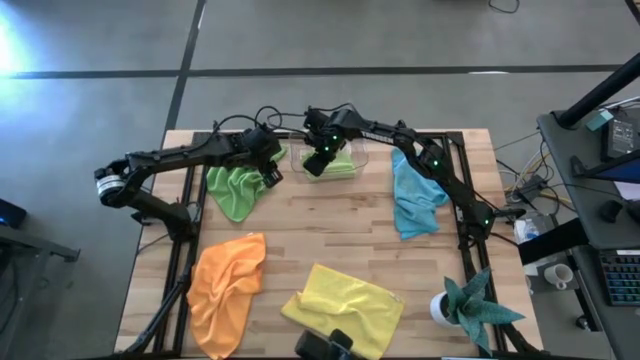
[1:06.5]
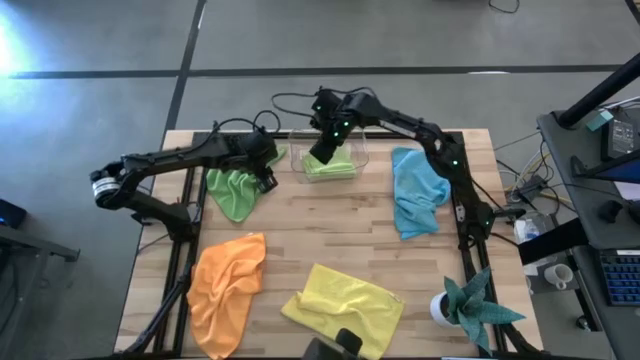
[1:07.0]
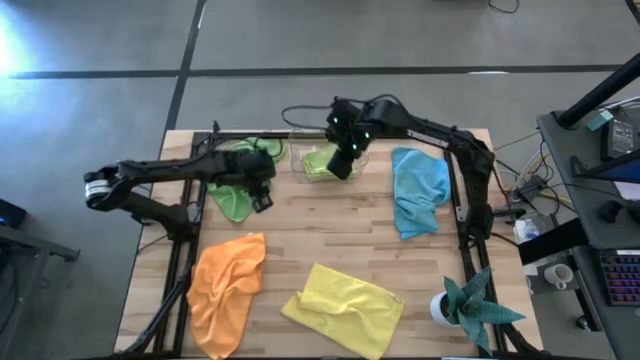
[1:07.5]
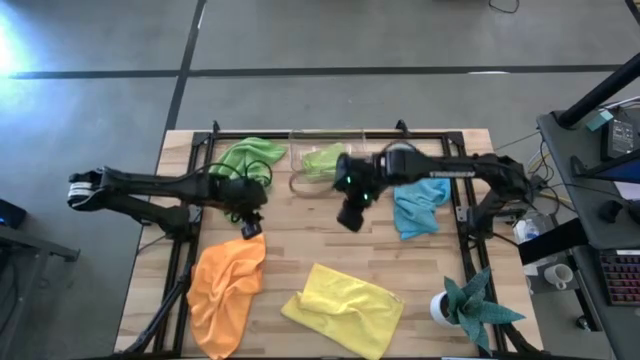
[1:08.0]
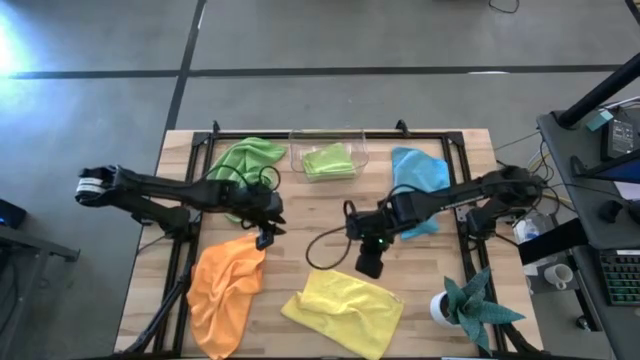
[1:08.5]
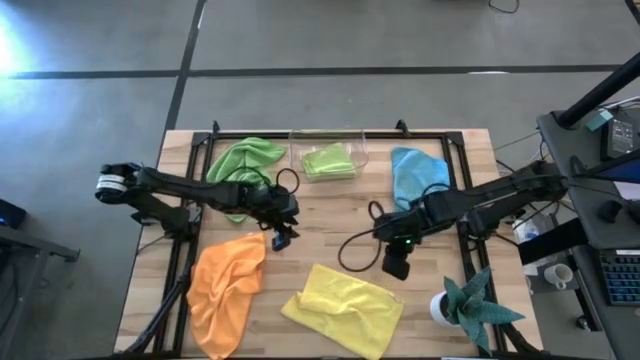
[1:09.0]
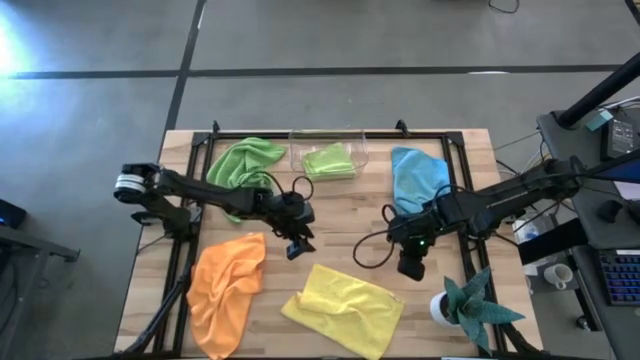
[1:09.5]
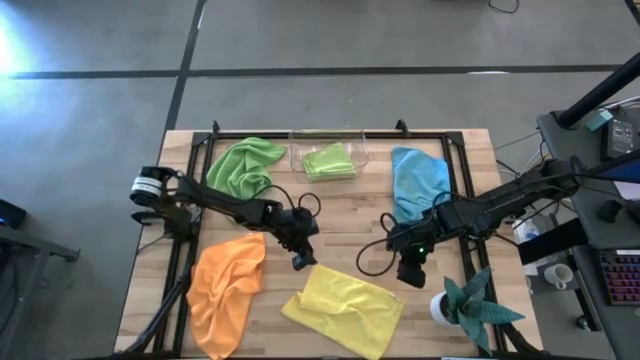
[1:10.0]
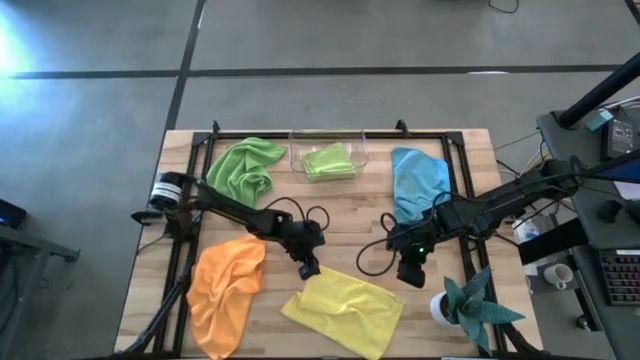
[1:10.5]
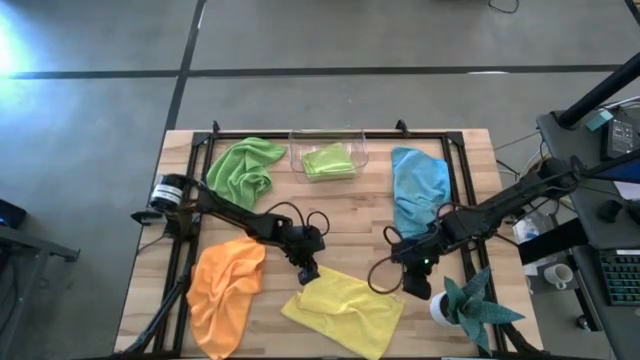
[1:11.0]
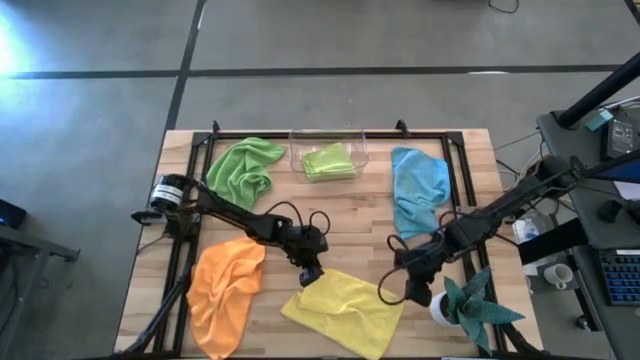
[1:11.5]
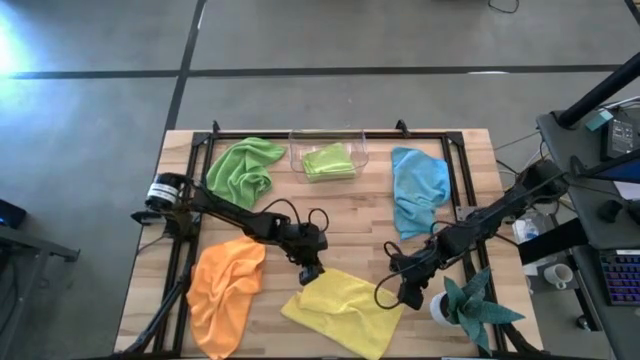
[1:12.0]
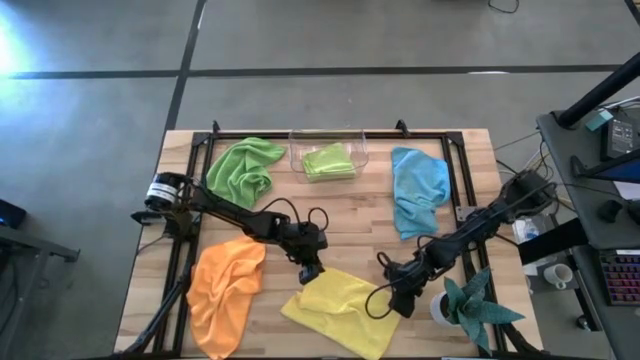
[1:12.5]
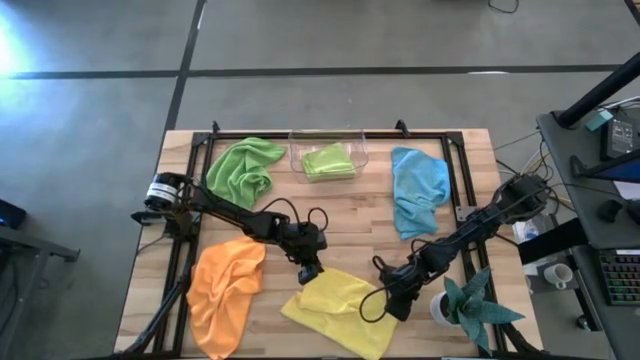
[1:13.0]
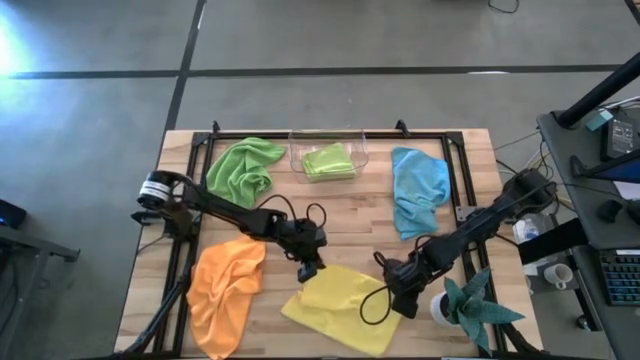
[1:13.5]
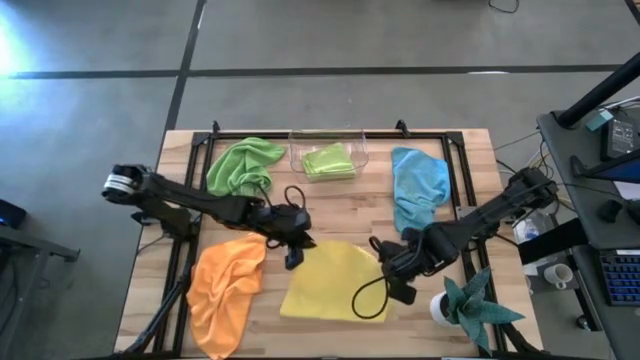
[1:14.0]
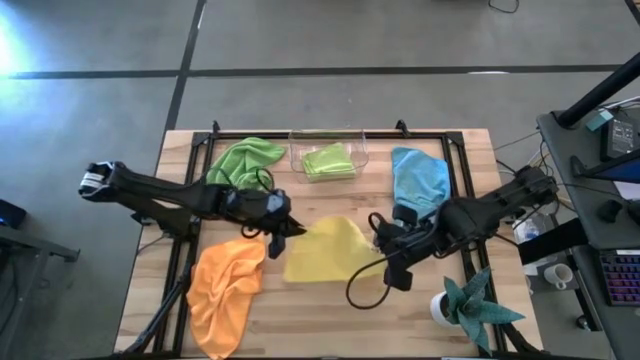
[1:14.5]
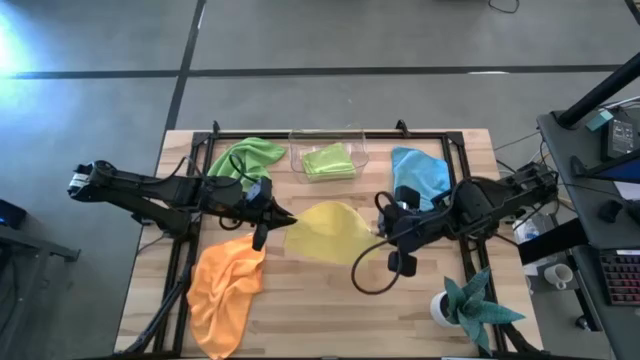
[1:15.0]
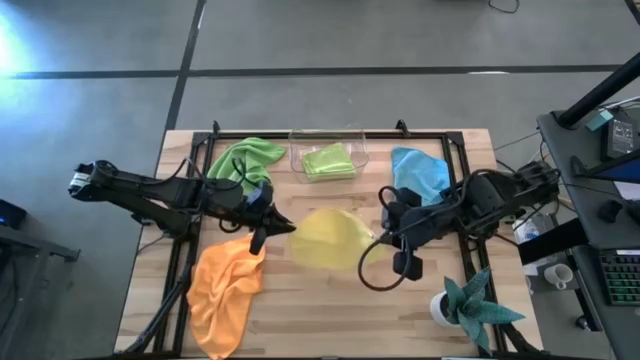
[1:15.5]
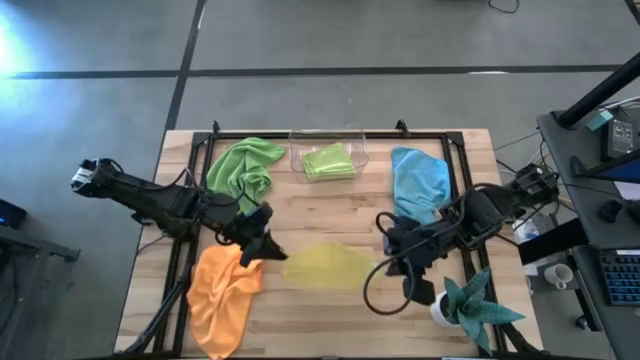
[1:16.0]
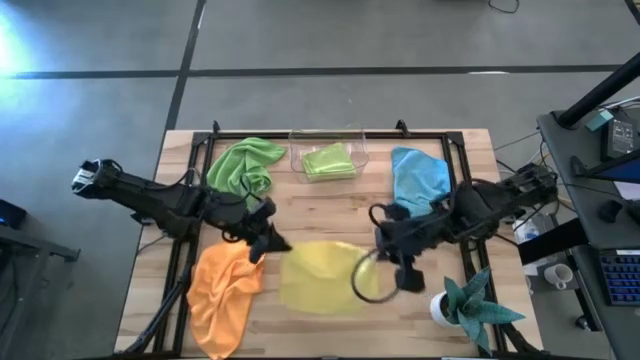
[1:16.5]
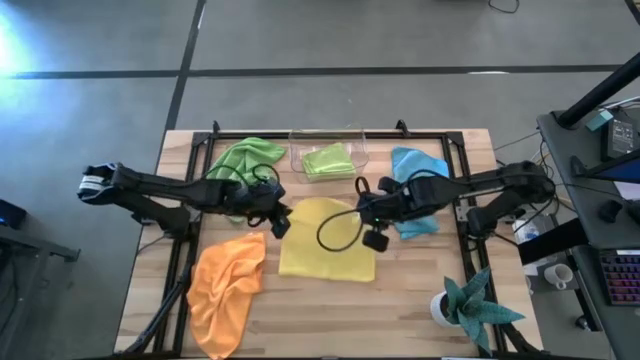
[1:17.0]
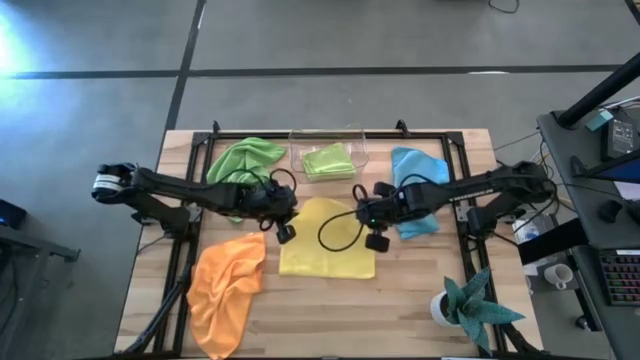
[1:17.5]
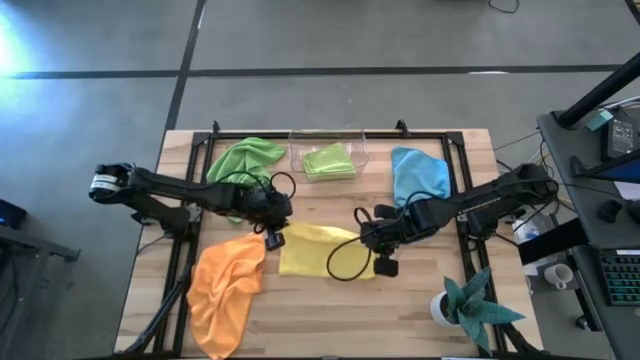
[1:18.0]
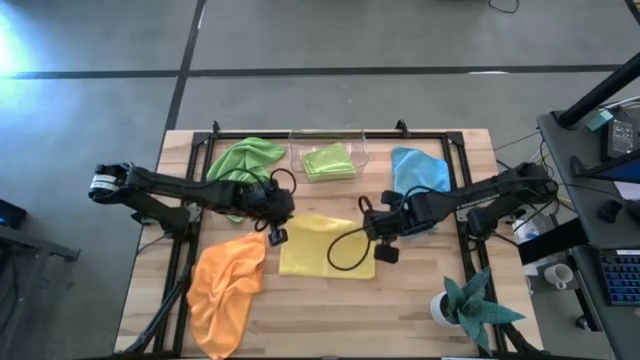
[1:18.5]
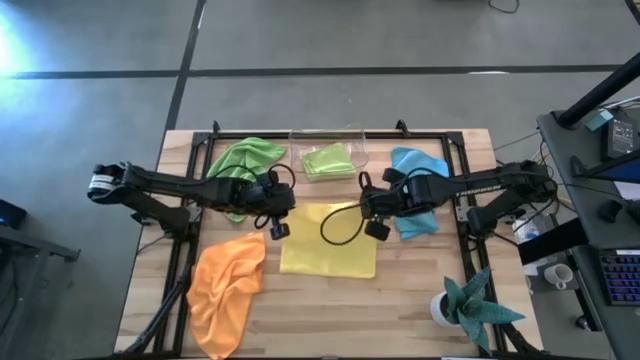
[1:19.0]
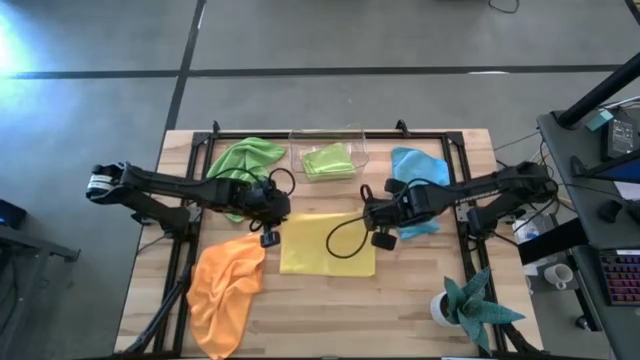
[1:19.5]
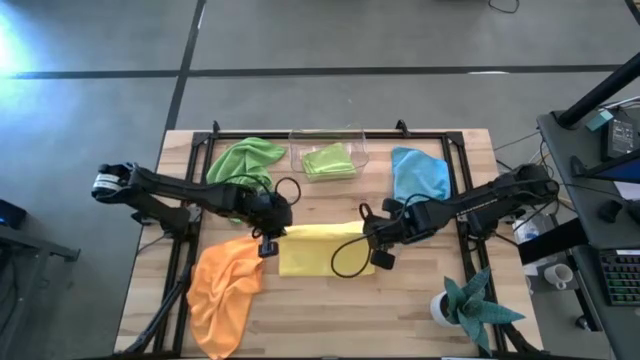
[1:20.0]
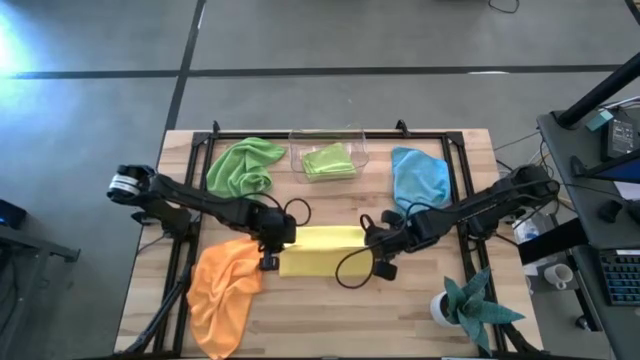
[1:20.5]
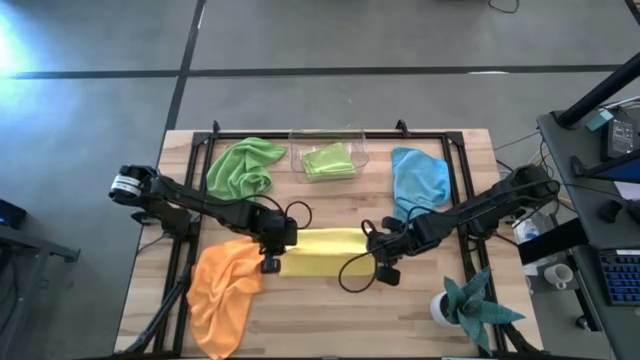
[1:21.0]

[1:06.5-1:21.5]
Task: Fold microfiber towels
Fold the yellow microfiber towel

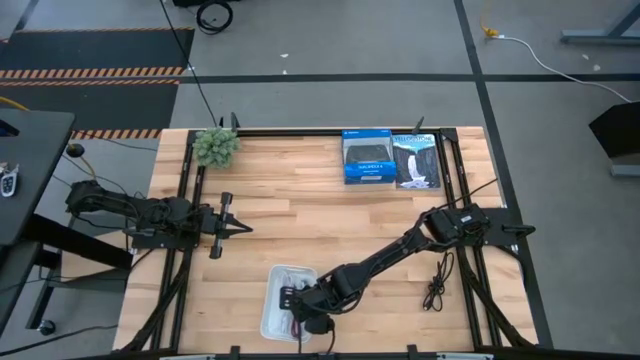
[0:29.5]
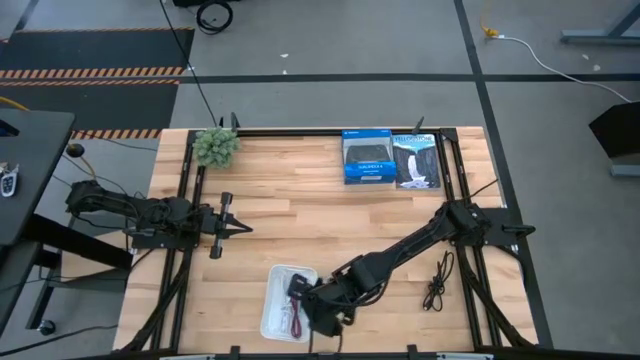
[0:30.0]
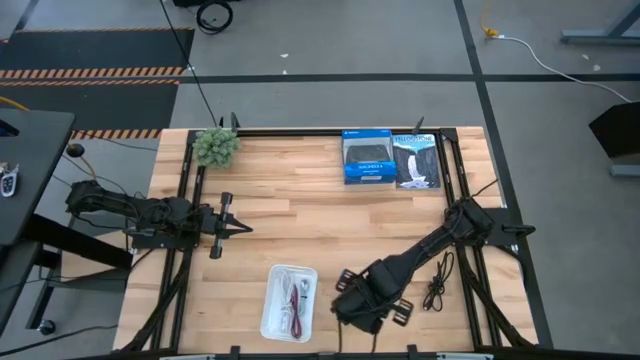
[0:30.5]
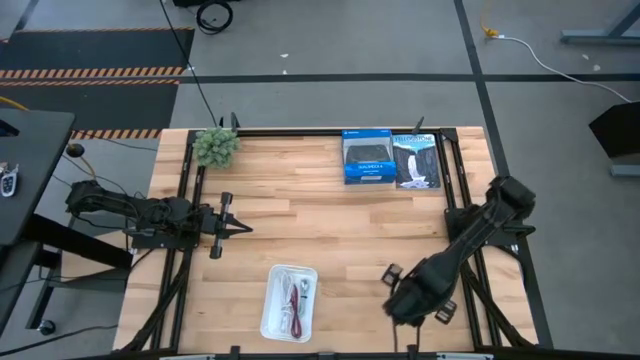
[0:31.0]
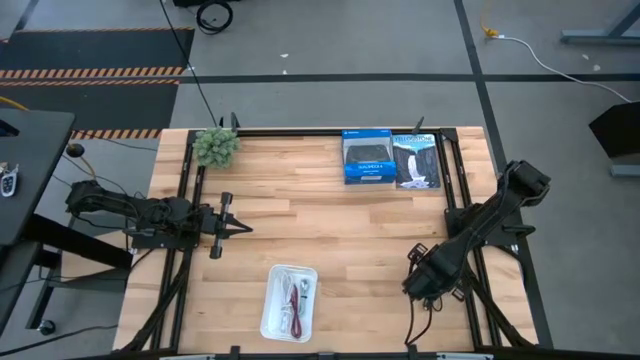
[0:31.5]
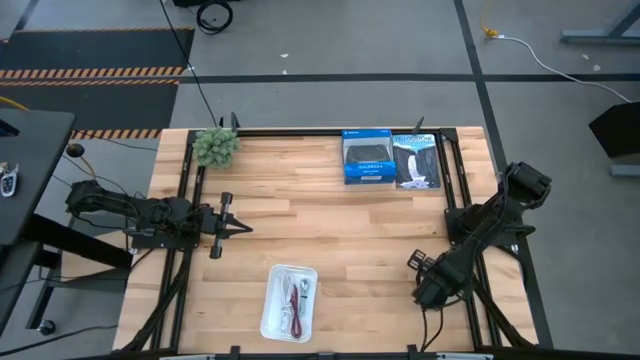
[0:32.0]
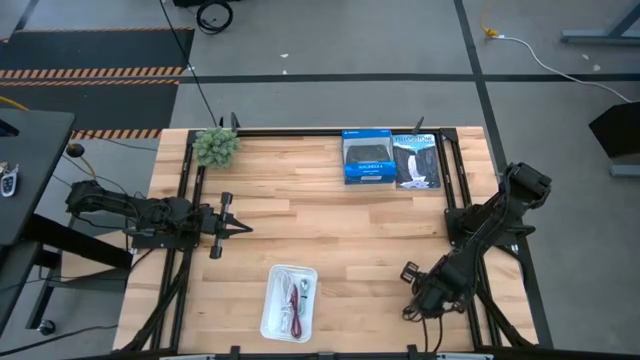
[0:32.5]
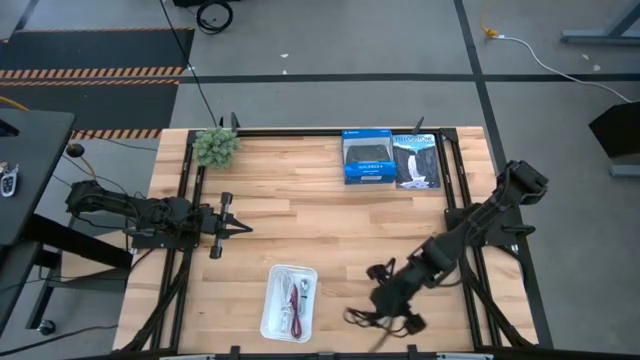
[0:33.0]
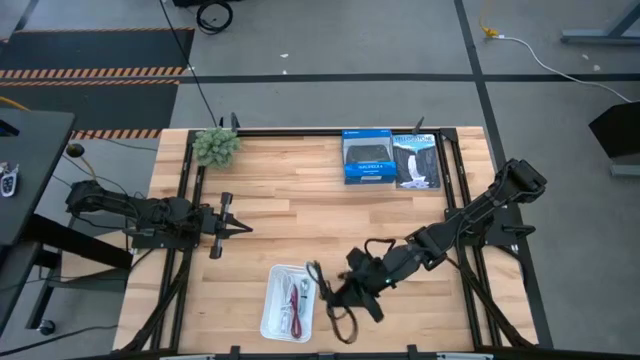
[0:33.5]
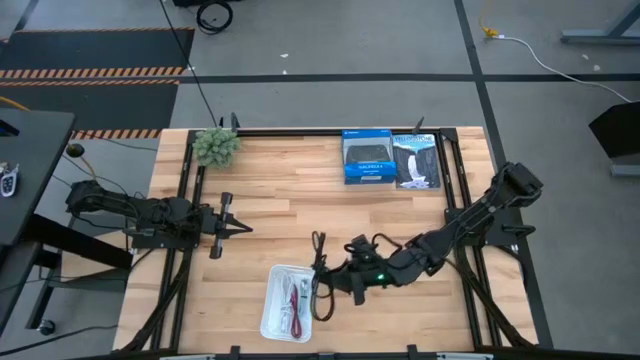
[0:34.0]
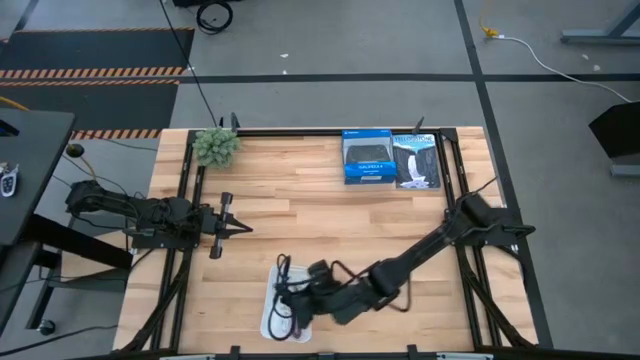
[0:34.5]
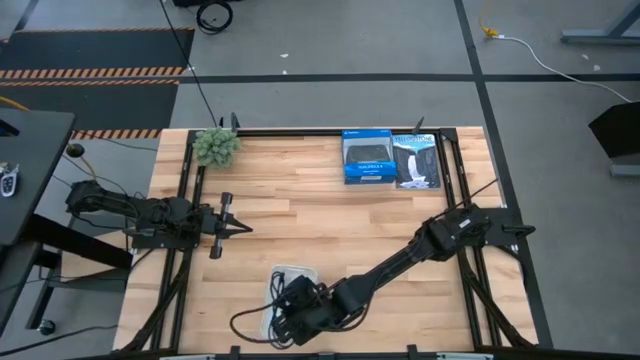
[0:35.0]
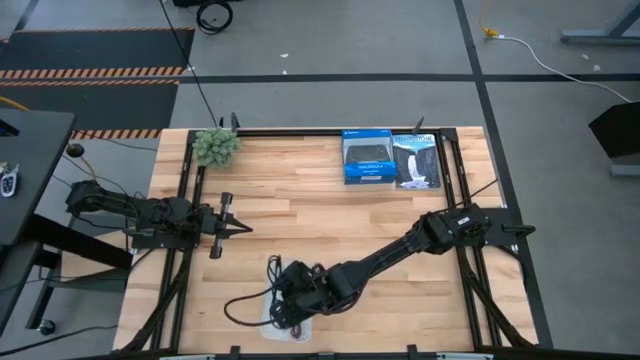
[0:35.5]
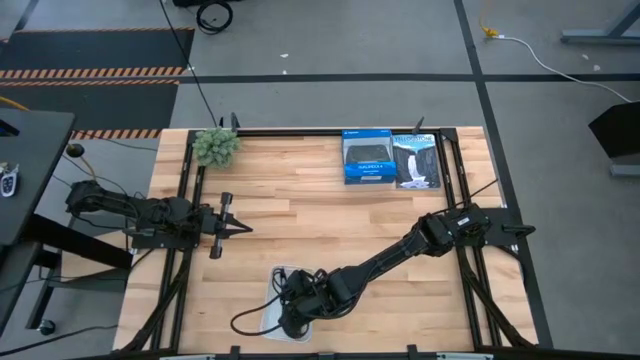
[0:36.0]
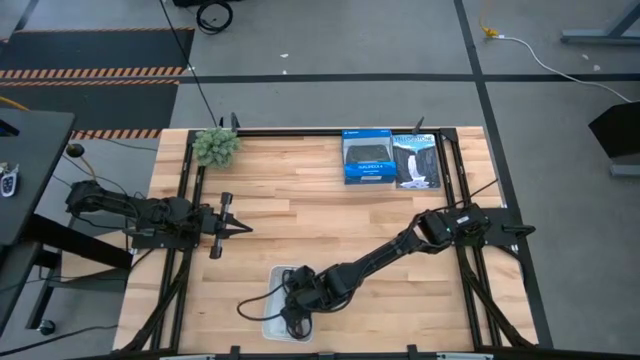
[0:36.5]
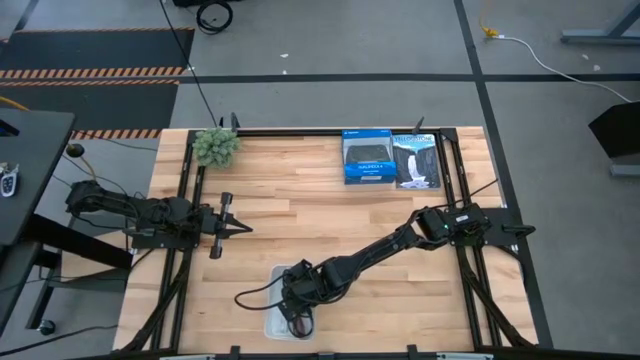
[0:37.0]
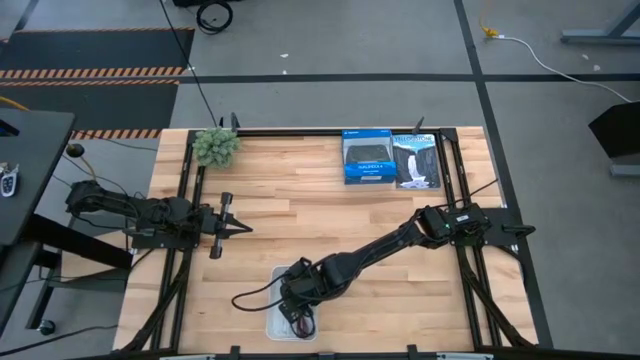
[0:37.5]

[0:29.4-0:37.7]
Task: Pick and place USB-C Cables
Put the black charger cable into the bin
